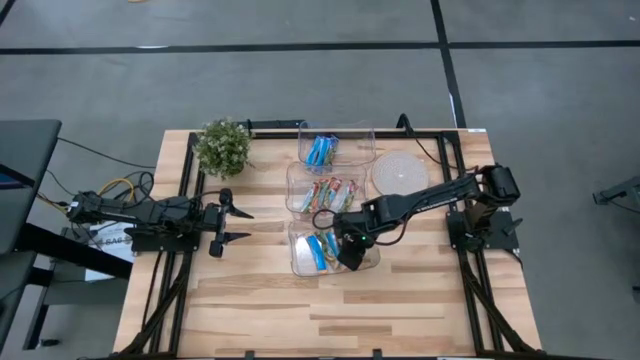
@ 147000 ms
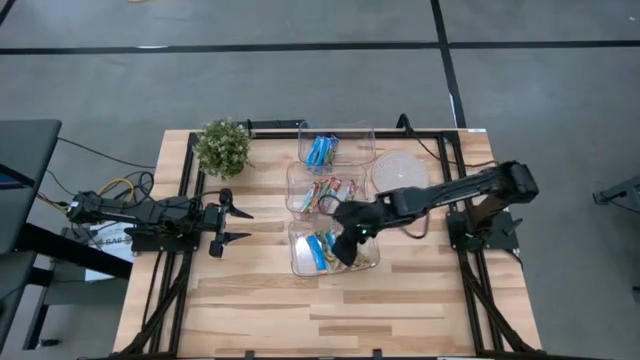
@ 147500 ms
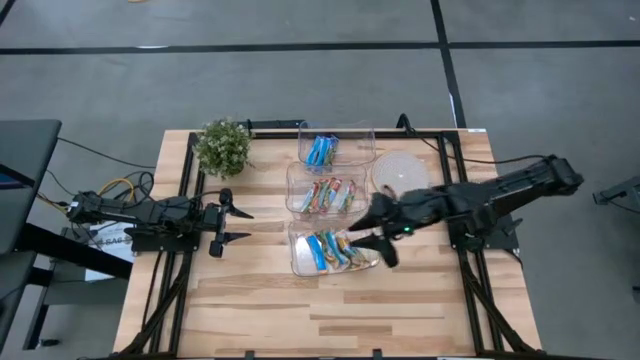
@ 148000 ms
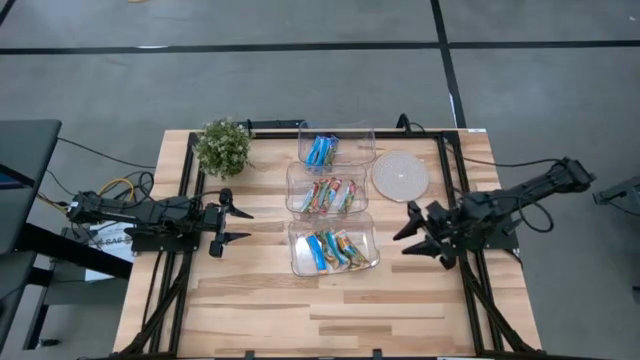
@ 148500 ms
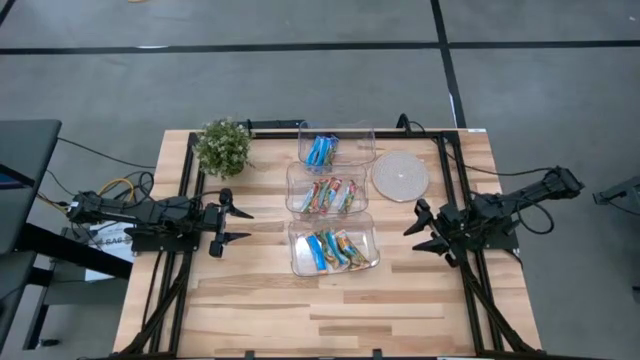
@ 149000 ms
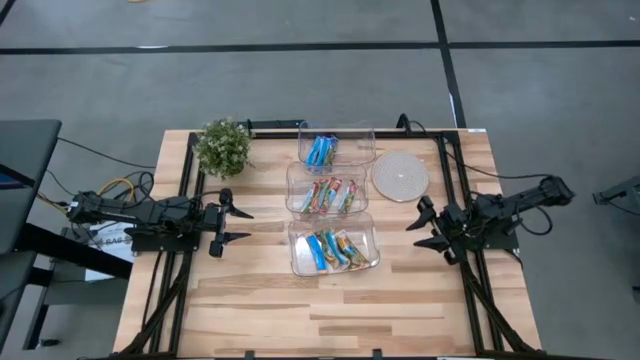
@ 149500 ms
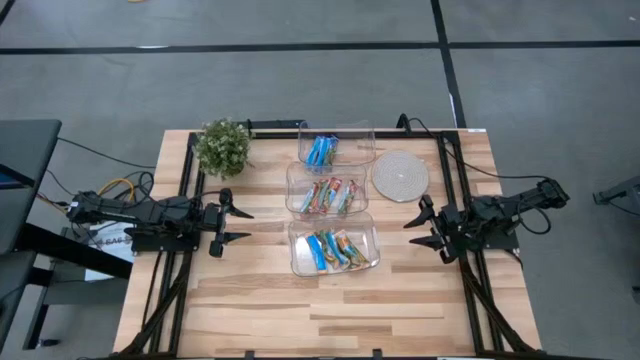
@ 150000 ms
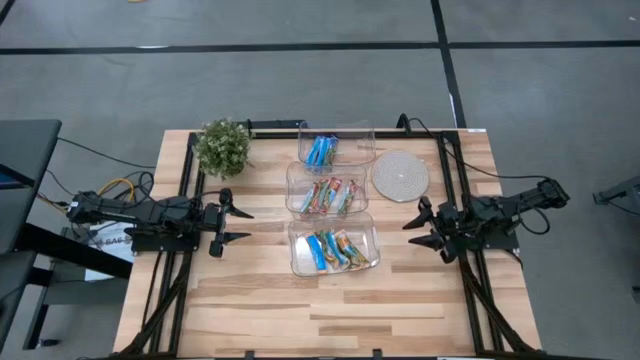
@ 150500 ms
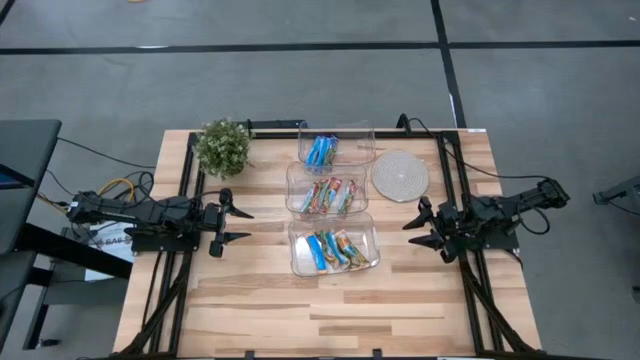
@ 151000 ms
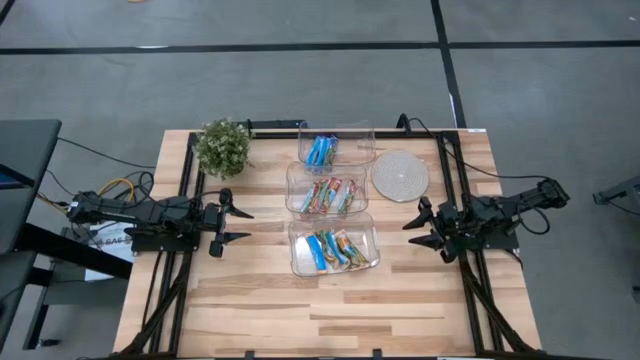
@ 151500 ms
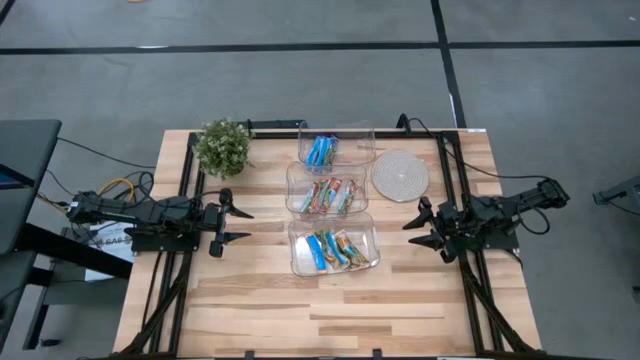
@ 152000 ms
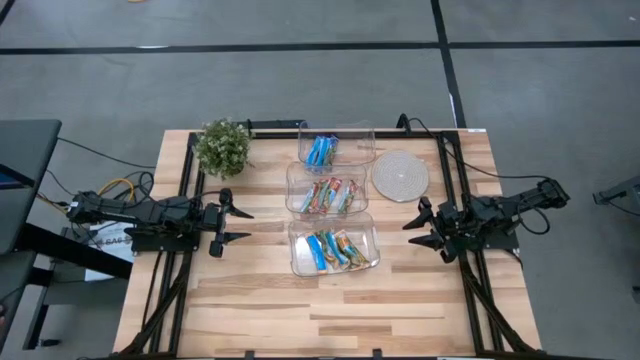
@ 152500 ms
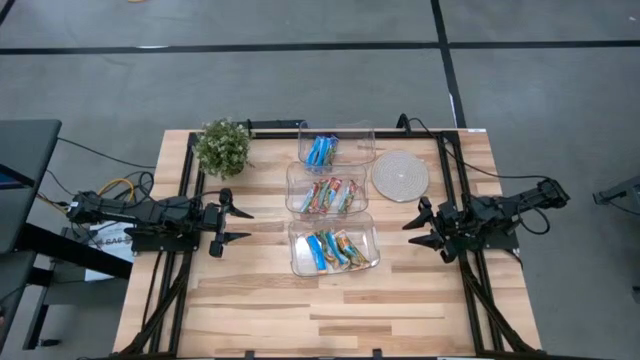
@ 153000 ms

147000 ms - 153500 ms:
Task: Pick and place Granola Bars by type
Return to Home Position

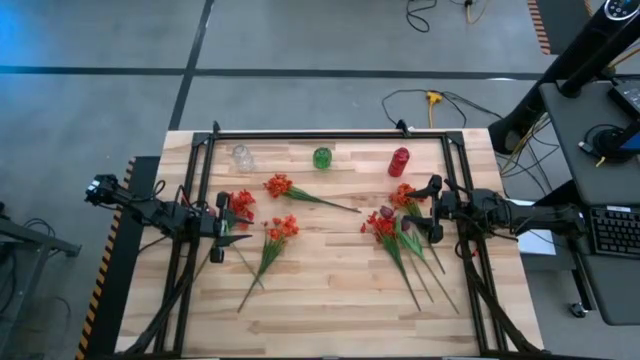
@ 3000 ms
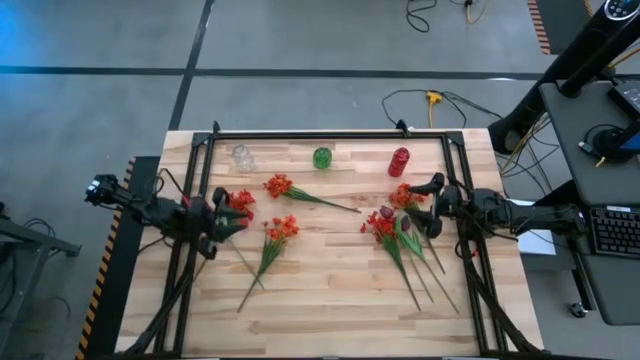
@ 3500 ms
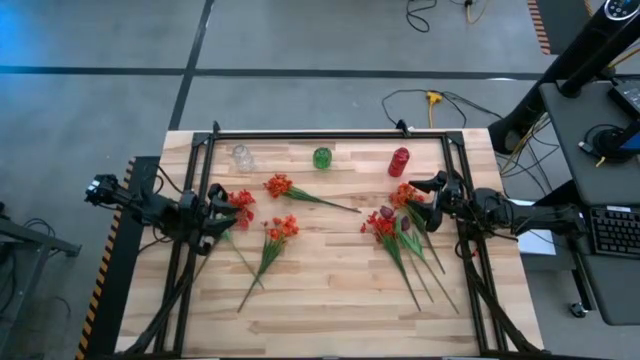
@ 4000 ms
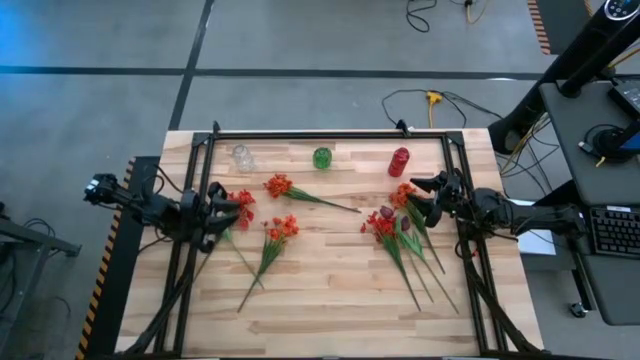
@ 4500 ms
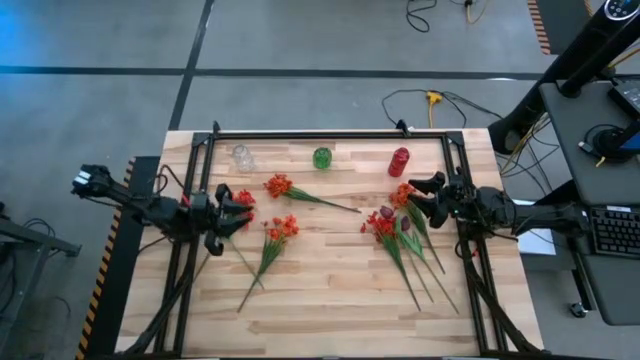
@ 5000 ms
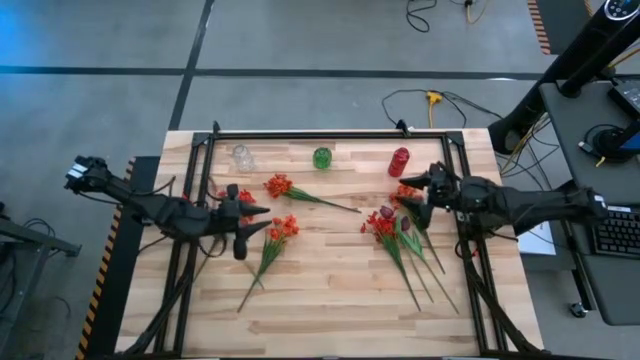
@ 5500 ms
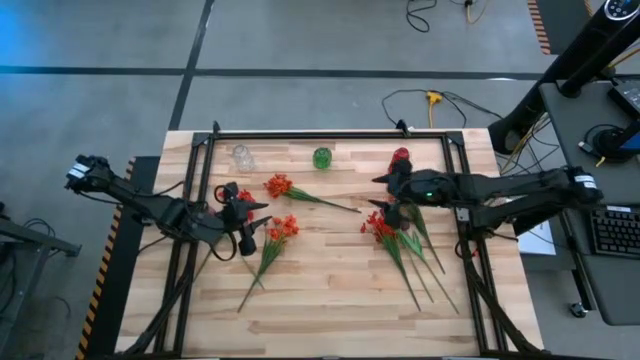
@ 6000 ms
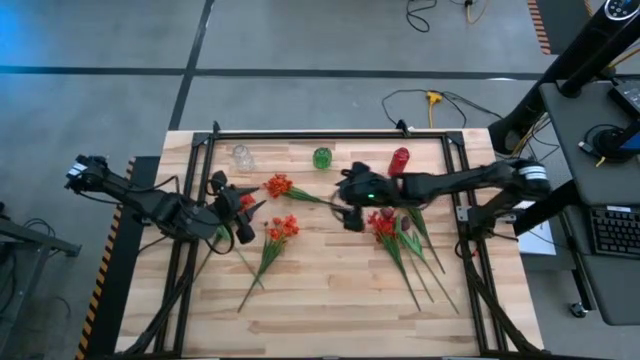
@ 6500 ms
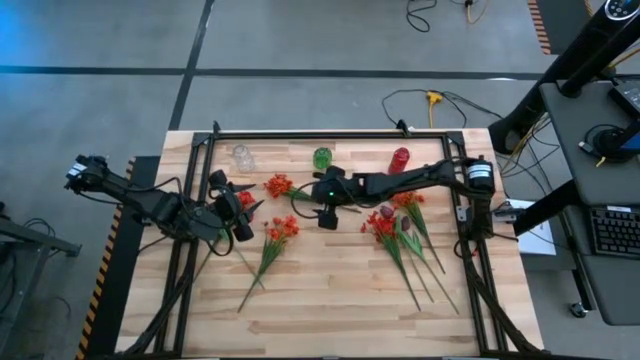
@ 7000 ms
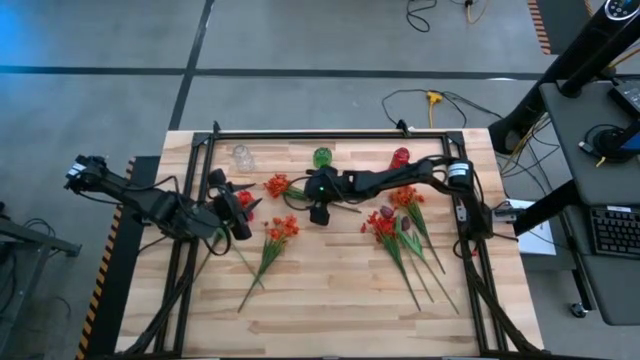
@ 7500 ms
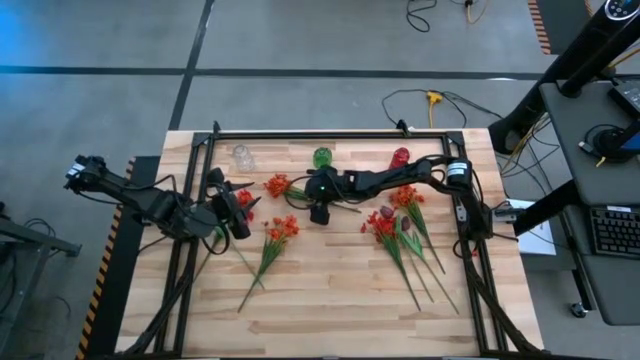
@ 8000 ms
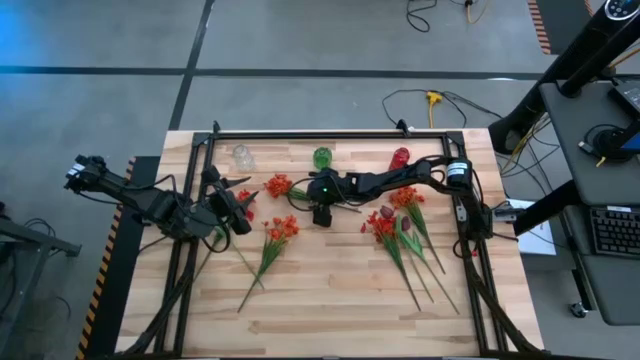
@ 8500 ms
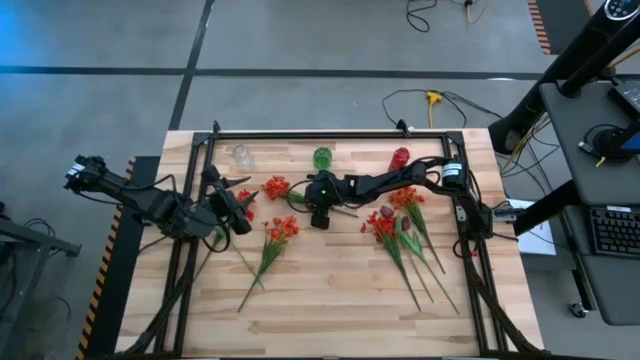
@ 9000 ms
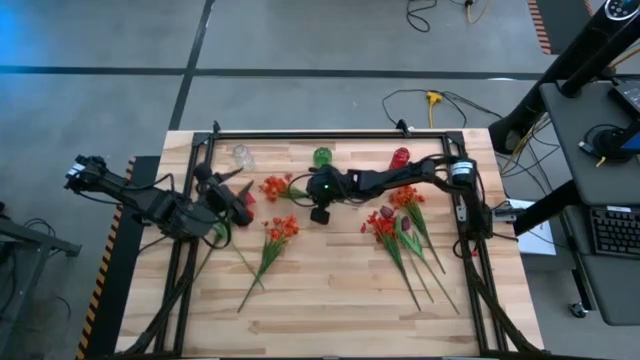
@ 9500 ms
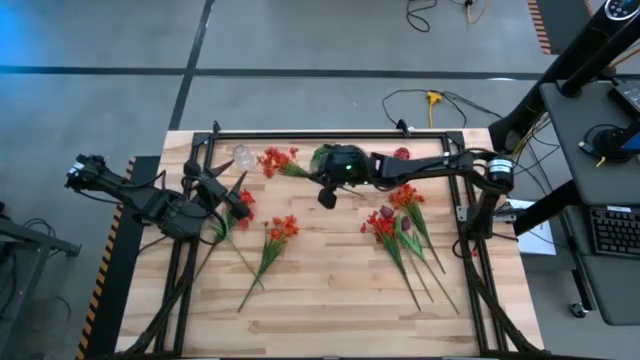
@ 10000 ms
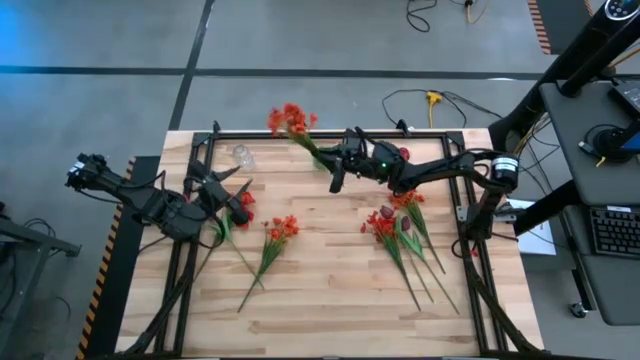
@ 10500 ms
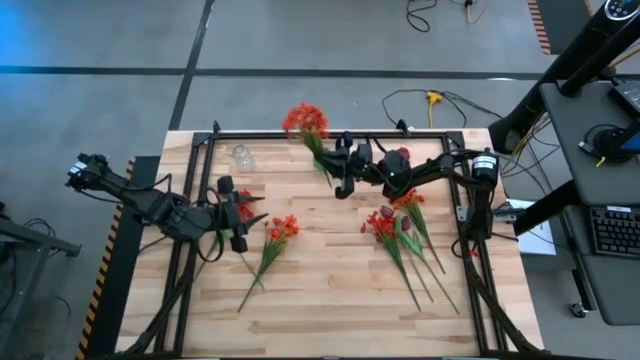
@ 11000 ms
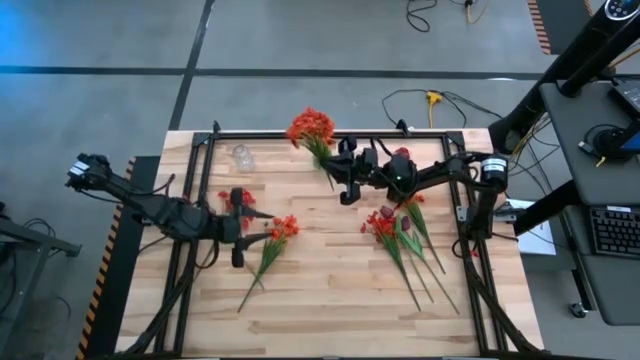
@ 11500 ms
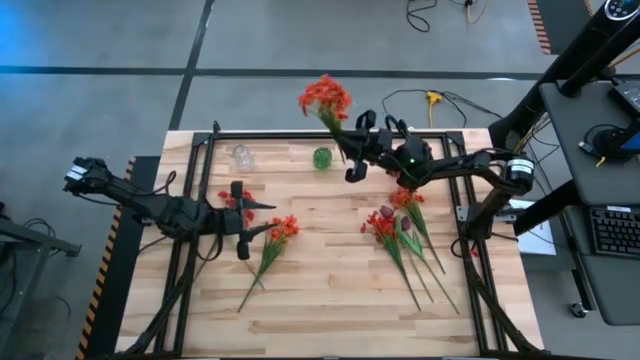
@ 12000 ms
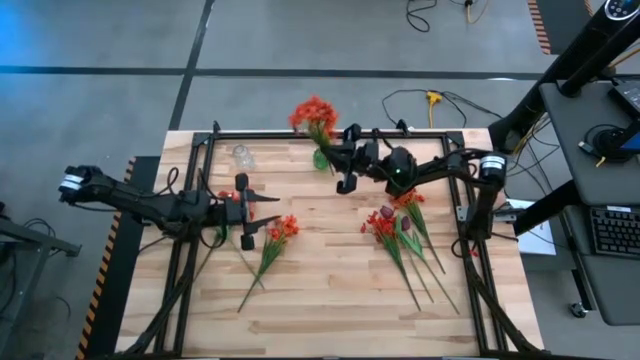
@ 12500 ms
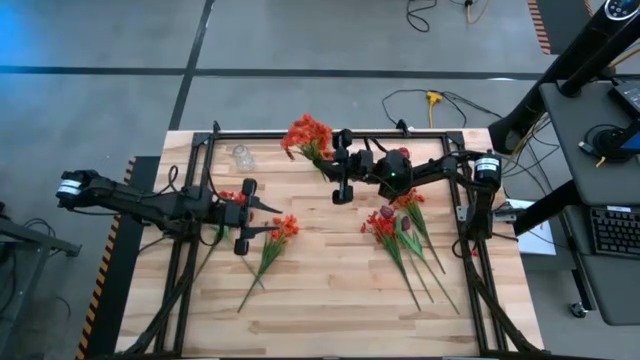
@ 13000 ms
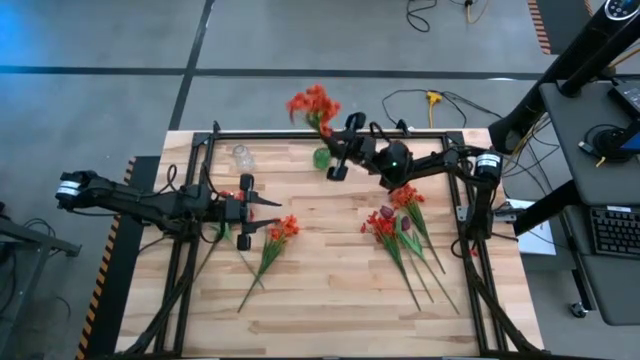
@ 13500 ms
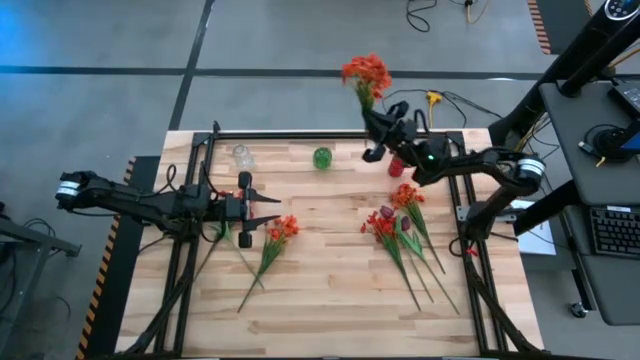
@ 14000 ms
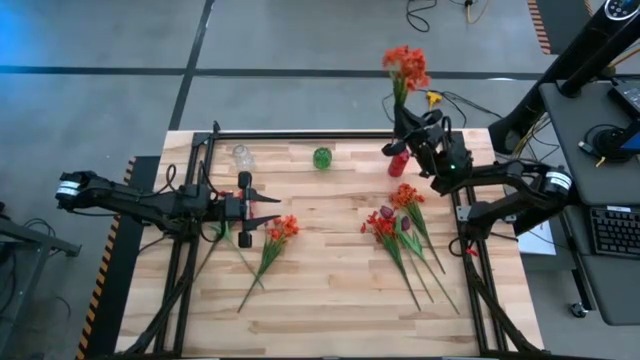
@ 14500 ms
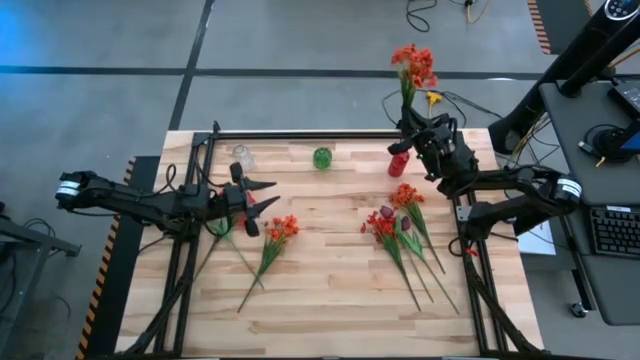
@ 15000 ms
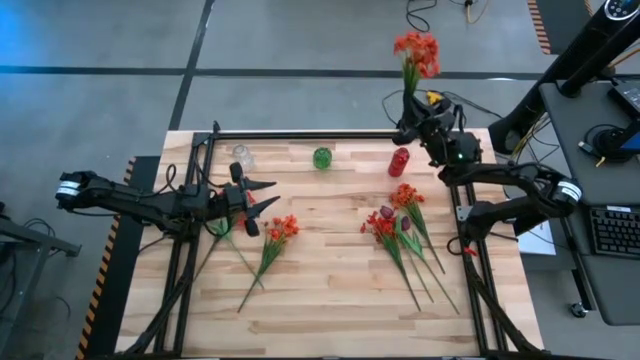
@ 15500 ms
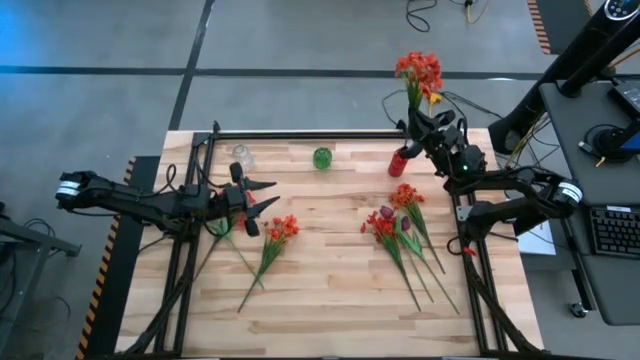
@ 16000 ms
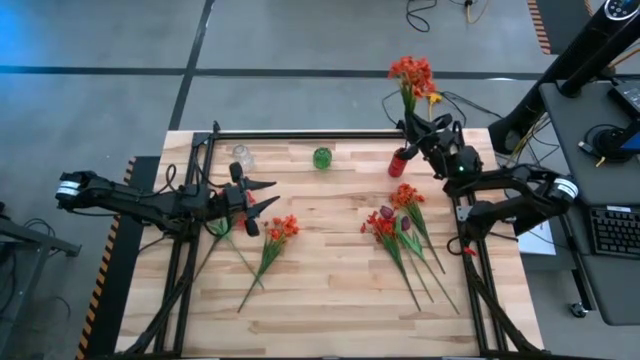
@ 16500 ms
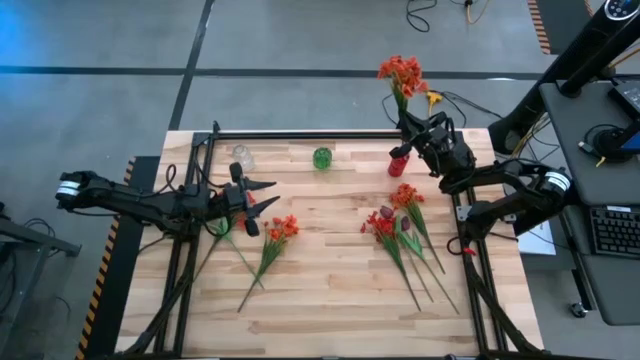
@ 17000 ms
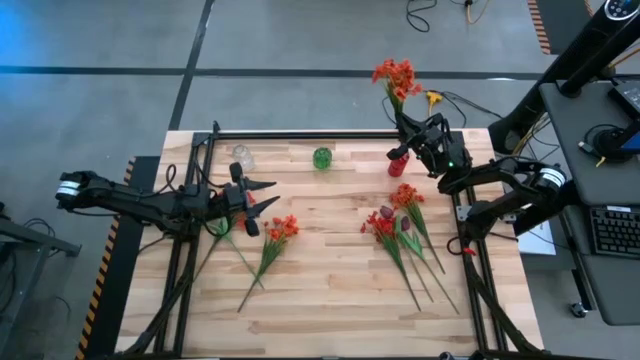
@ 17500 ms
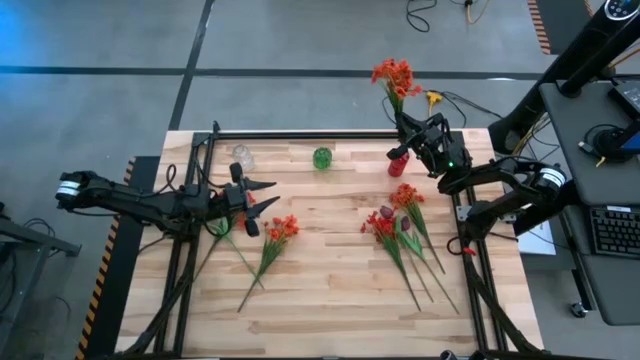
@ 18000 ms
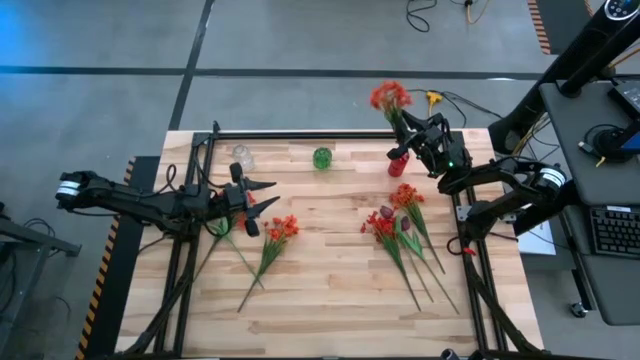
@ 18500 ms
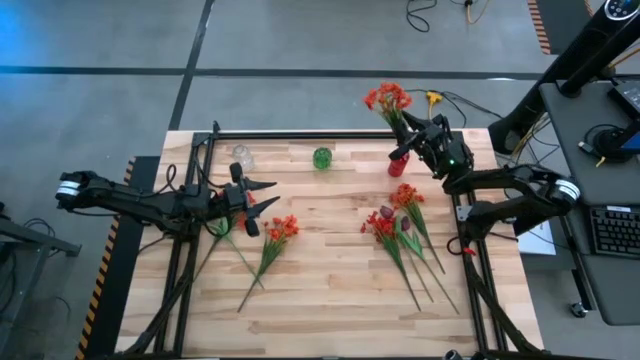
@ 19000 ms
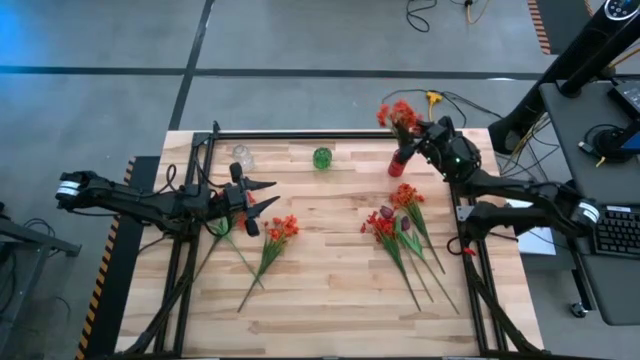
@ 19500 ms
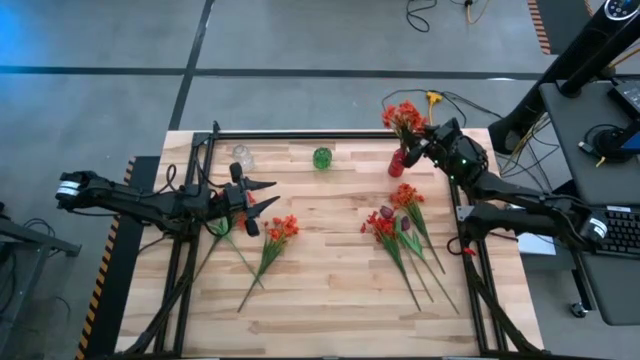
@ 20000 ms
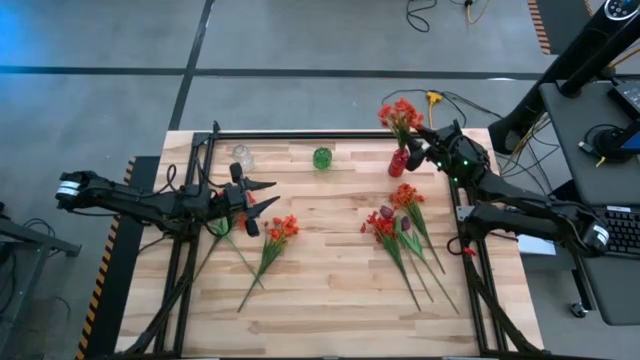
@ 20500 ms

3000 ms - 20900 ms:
Task: Sort flowers into vase by color
Put the top left orange flower into the red vase
